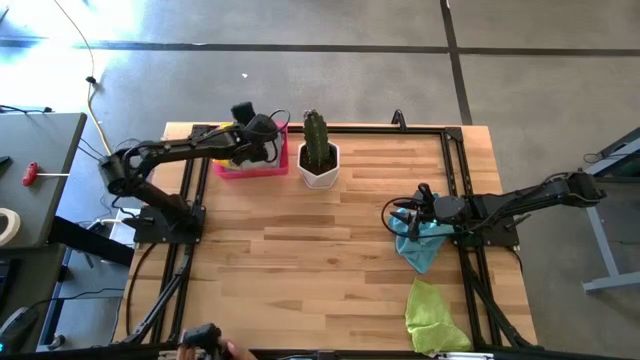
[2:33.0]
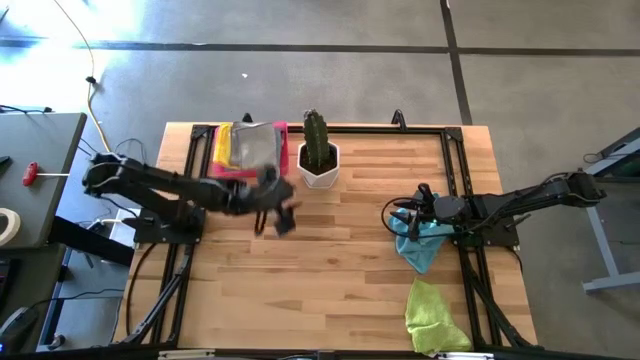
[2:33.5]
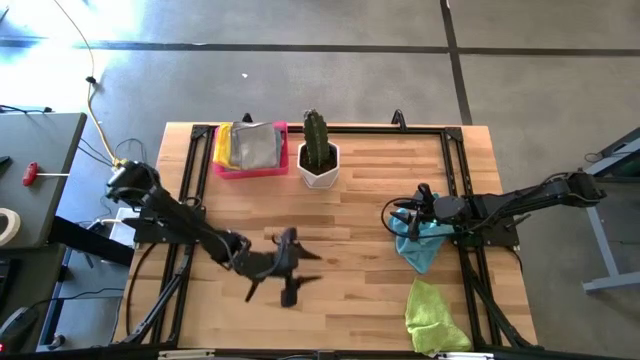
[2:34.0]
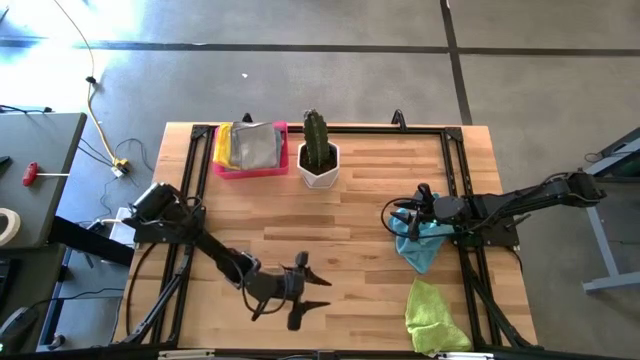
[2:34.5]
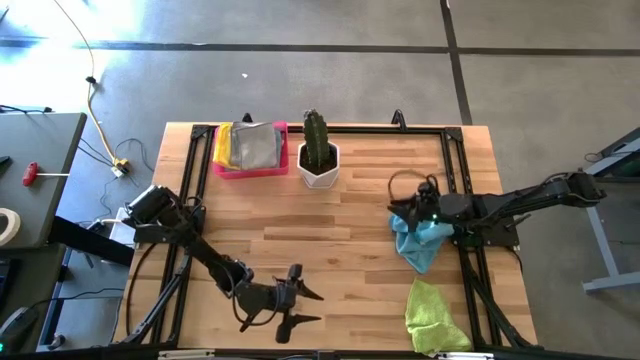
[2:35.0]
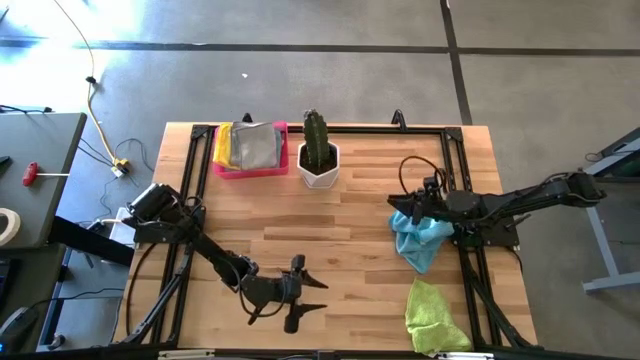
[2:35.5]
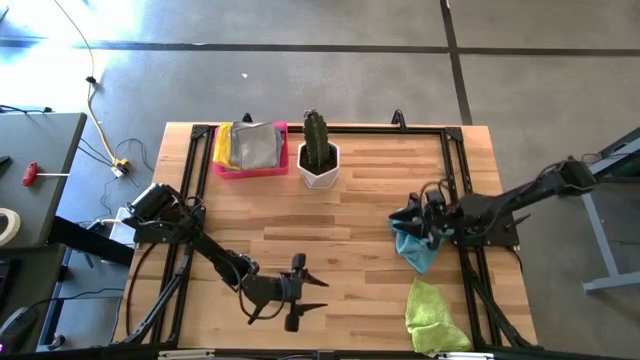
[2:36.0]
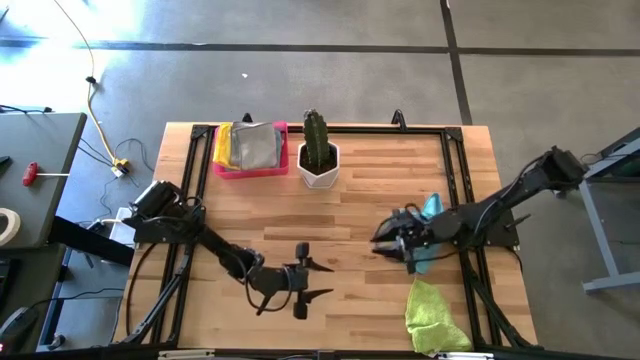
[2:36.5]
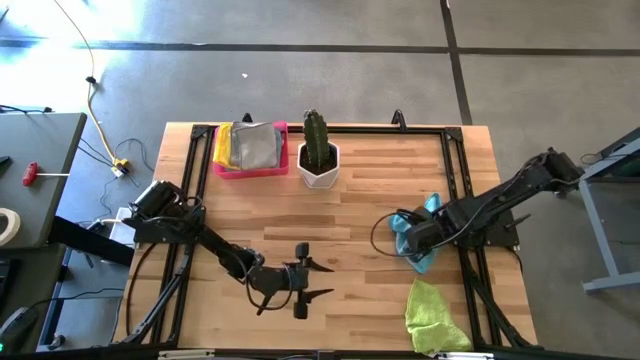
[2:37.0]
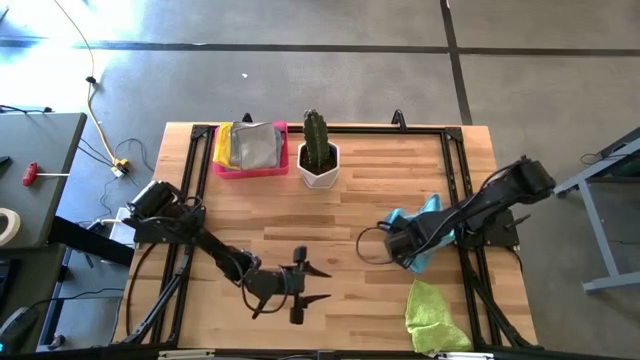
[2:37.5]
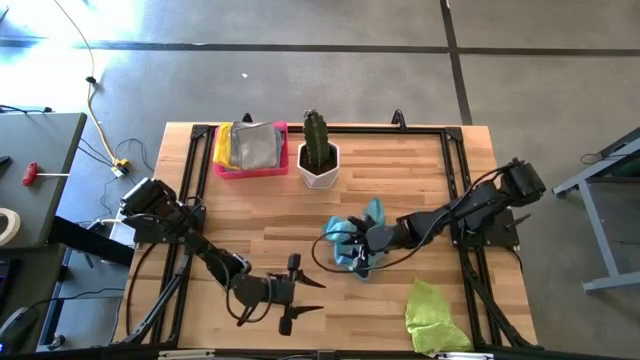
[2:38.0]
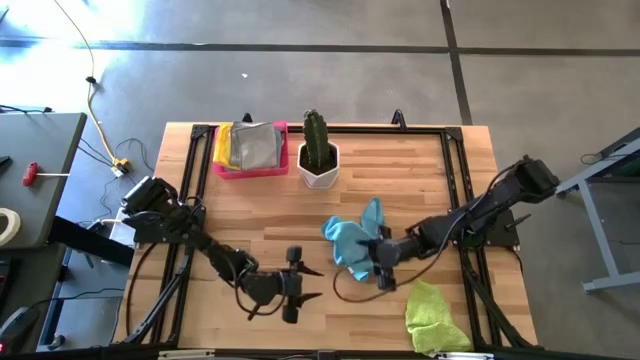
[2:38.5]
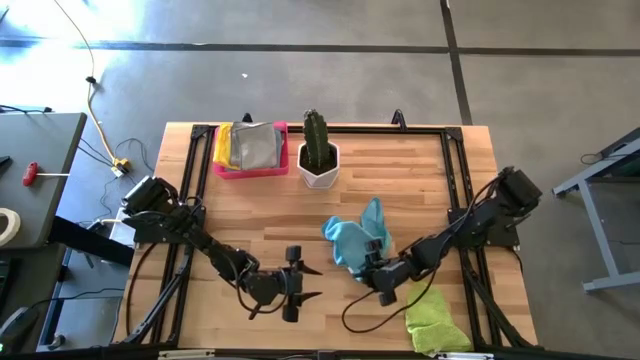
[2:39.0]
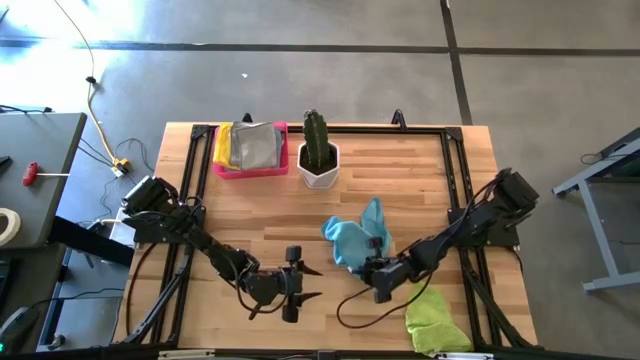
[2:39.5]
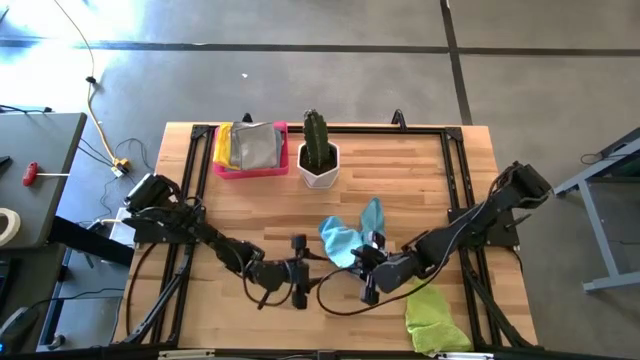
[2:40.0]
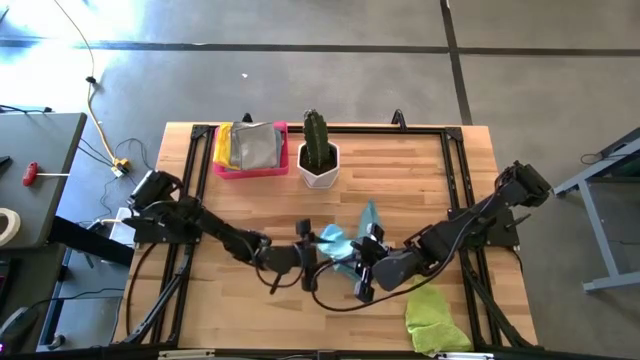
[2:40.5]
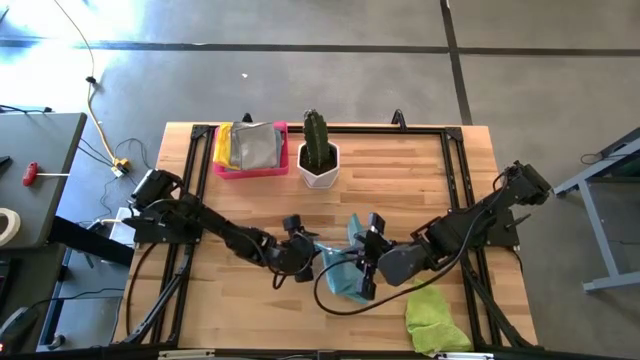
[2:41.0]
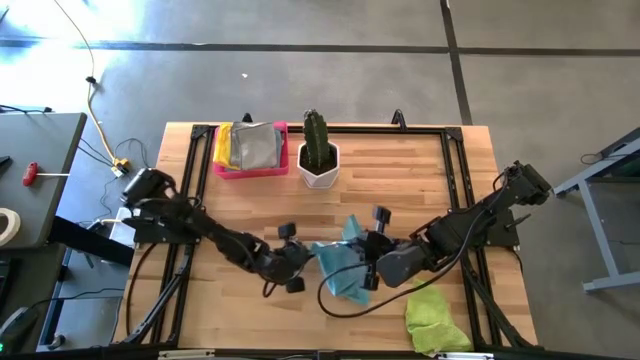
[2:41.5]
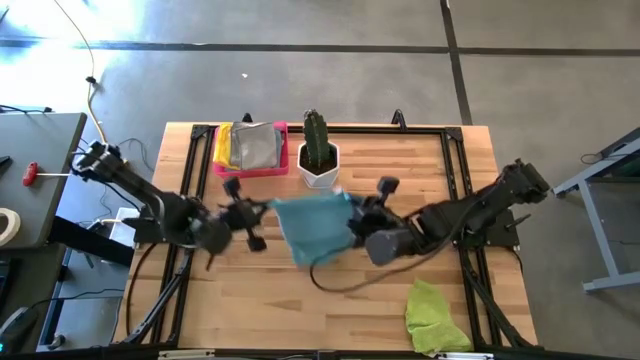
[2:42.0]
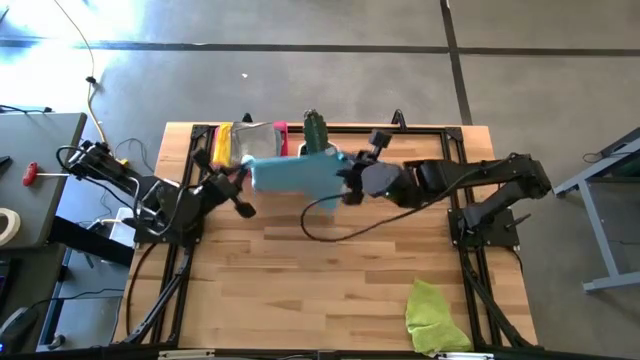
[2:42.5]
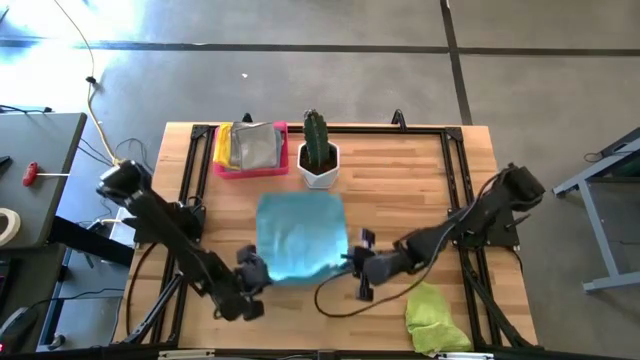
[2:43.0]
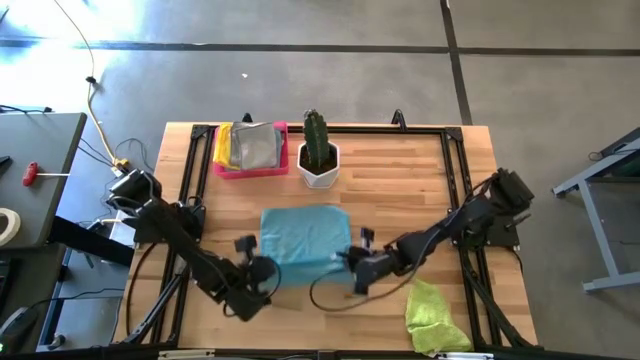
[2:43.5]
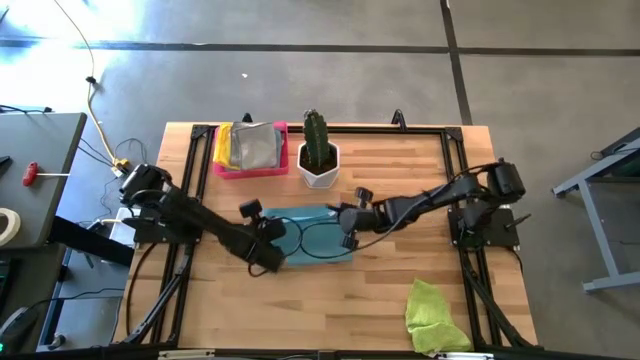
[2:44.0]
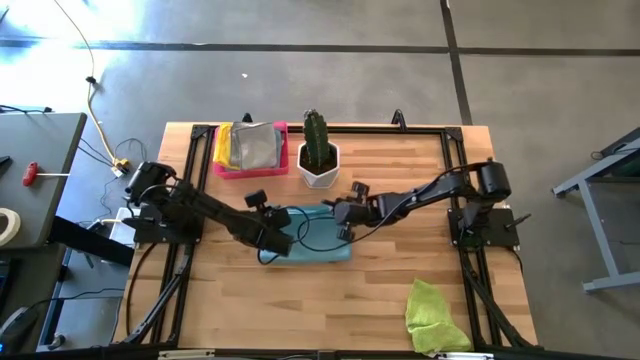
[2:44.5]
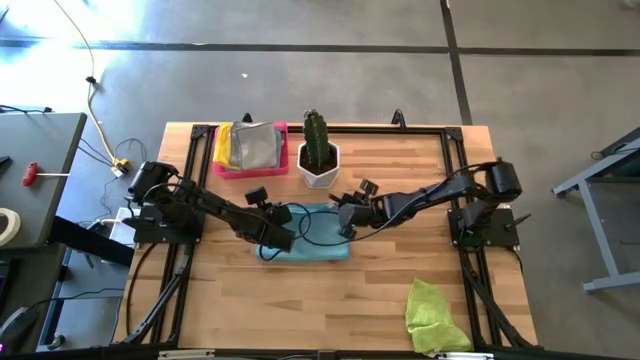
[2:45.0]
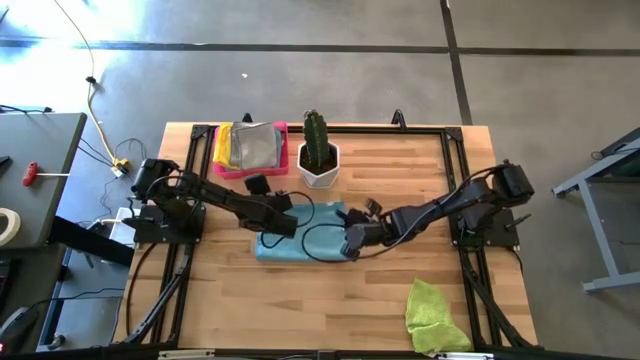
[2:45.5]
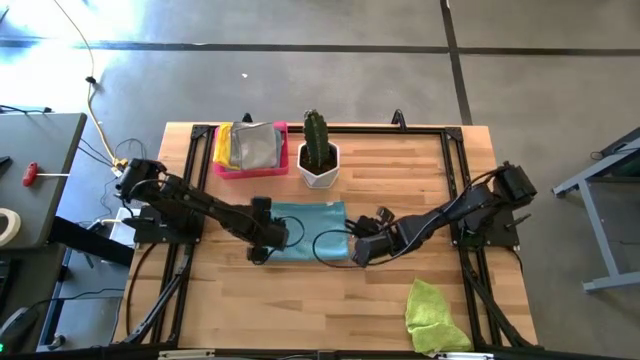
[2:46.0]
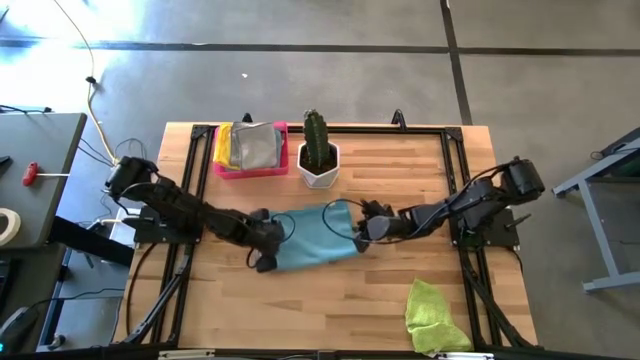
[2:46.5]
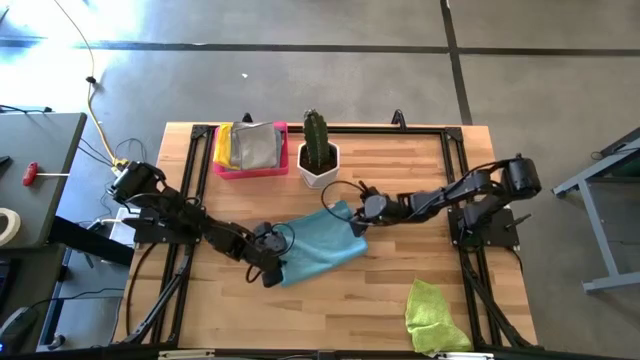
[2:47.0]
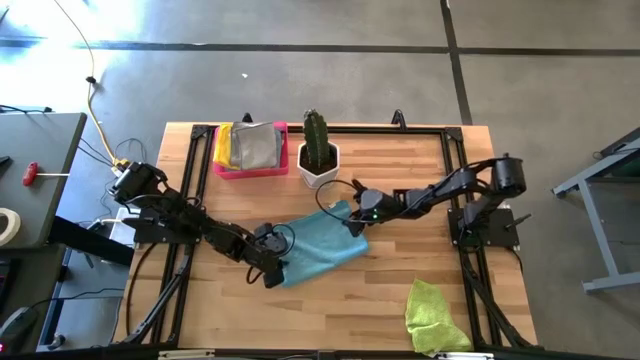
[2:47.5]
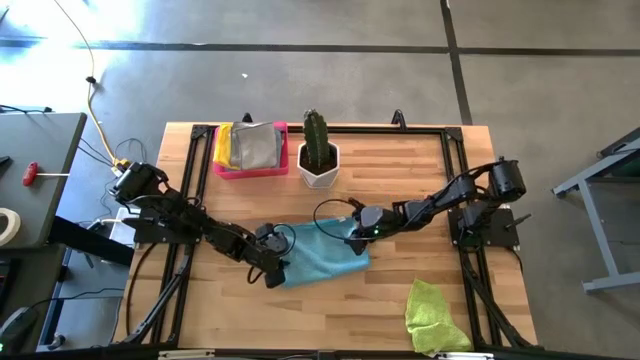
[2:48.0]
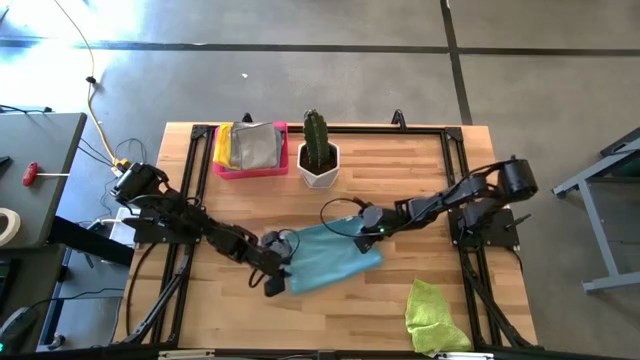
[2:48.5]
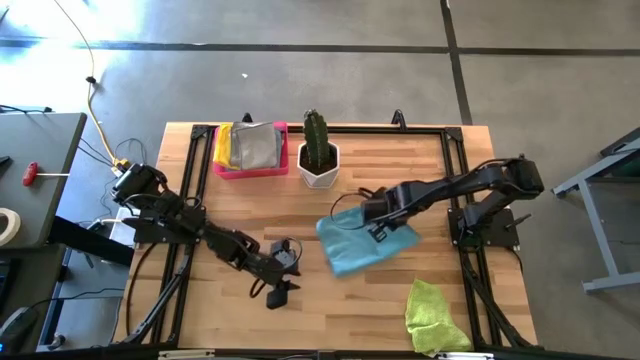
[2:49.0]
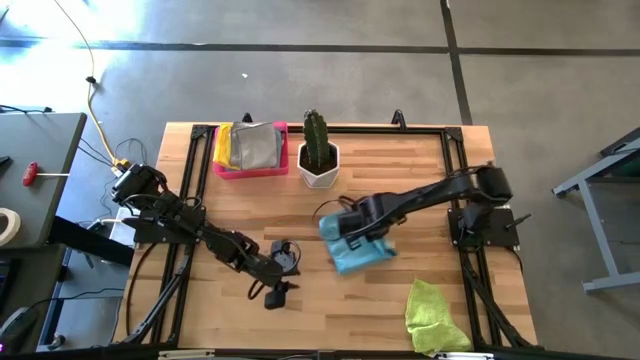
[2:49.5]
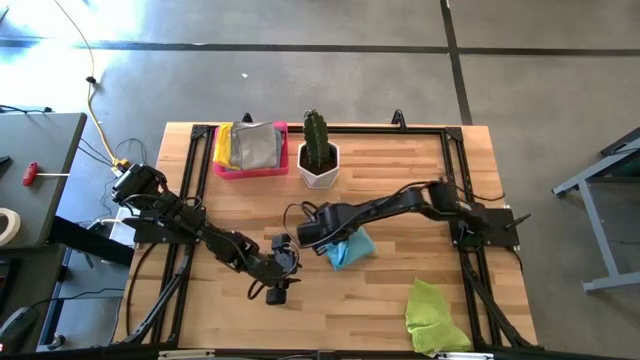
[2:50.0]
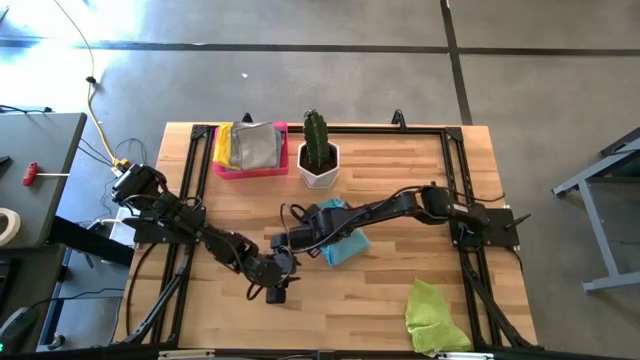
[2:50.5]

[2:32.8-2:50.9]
Task: Fold microfiber towels
Fold the blue microfiber towel

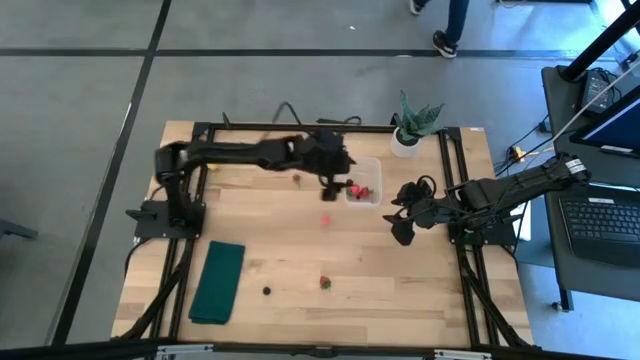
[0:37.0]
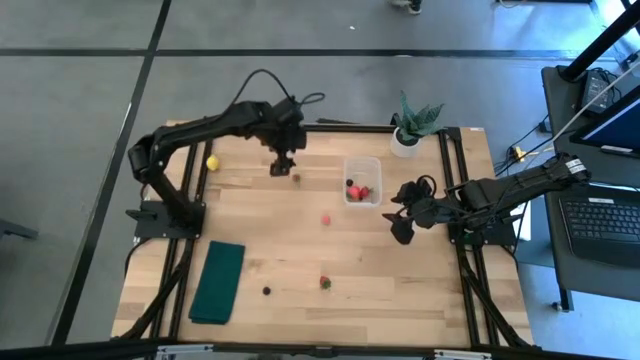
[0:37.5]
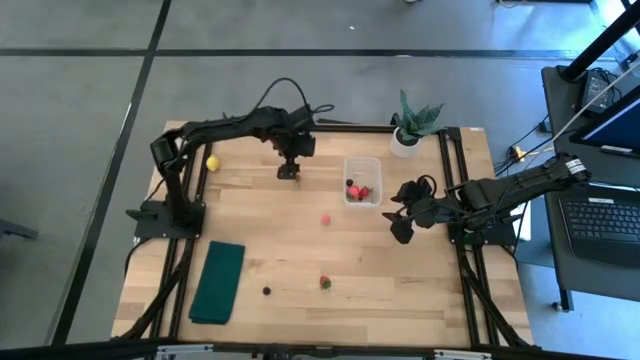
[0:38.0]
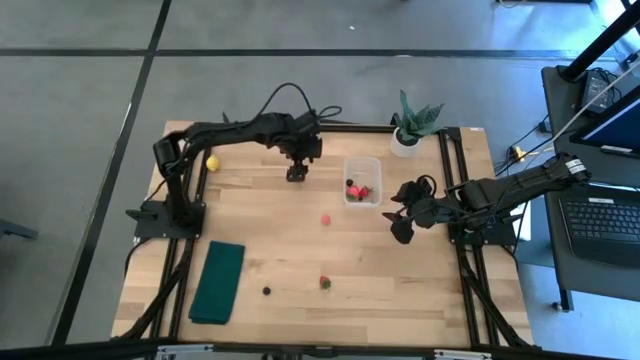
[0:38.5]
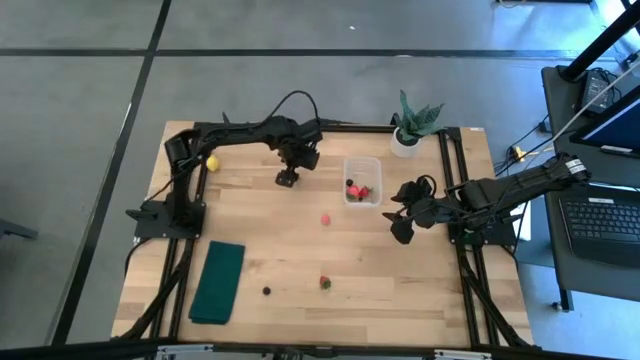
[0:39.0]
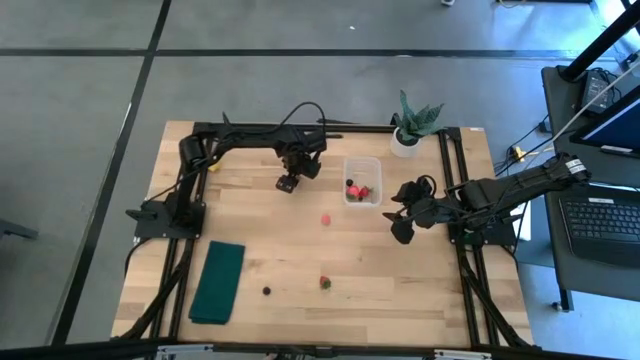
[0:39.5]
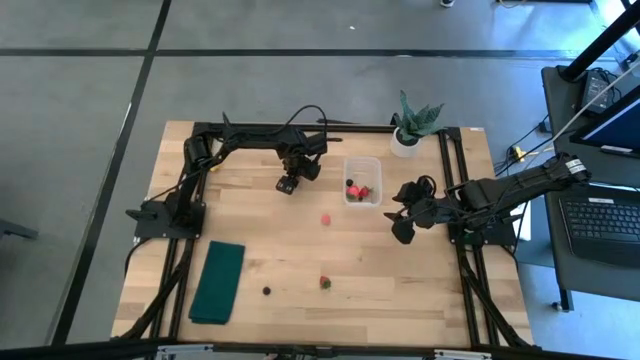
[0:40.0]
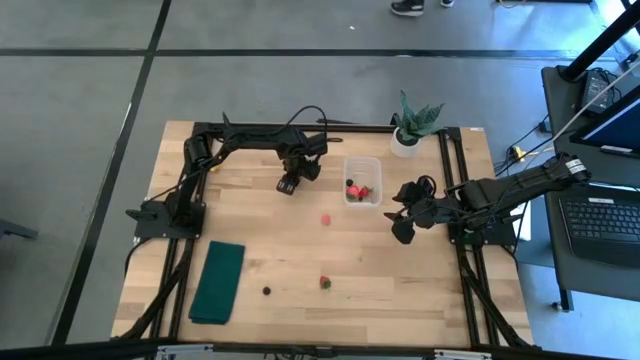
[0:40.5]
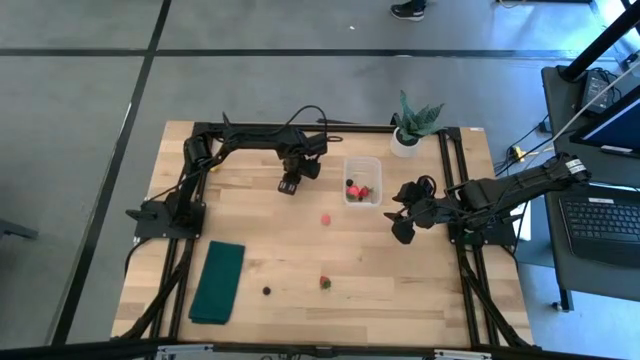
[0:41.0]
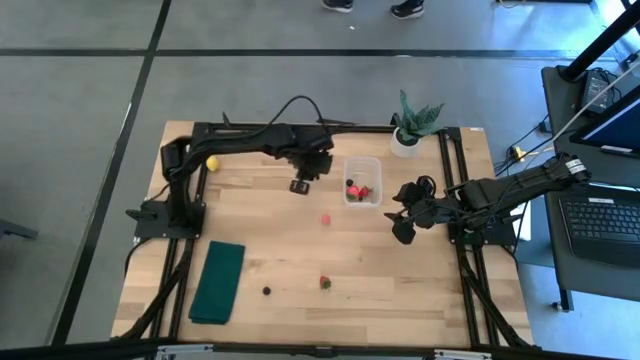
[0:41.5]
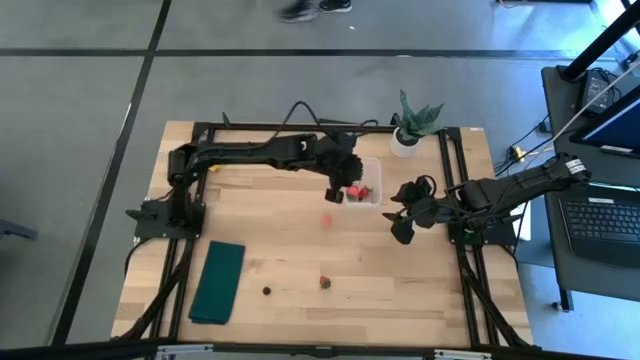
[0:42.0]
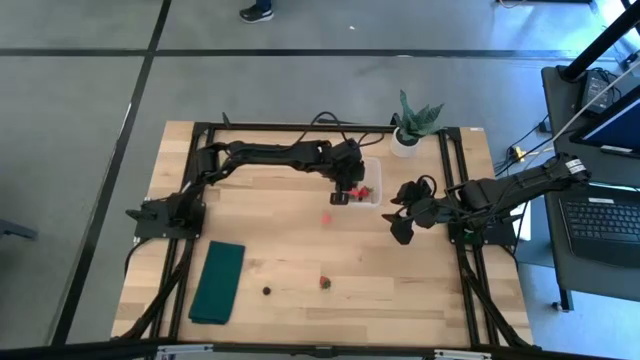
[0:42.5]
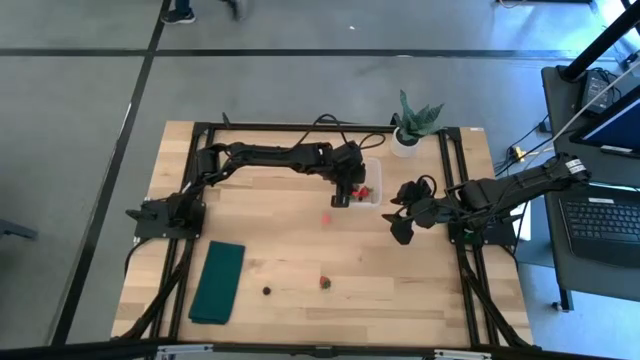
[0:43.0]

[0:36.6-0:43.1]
Task: Pick and placing Produce into tupperware
Put the top red strawberry into the transparent container
